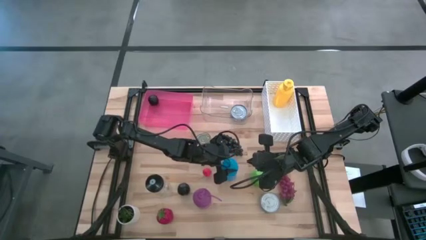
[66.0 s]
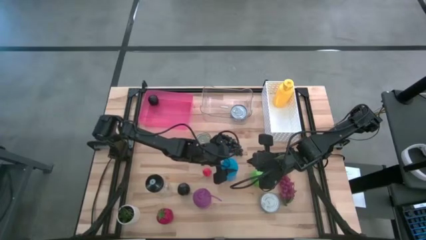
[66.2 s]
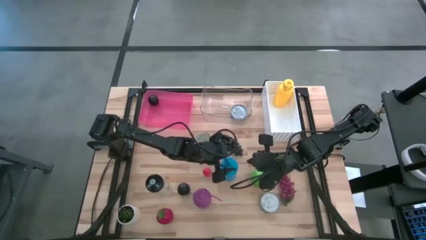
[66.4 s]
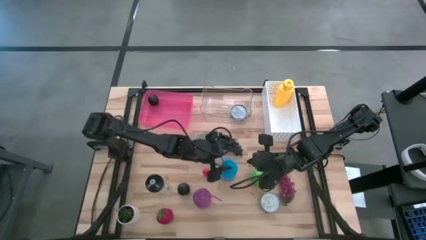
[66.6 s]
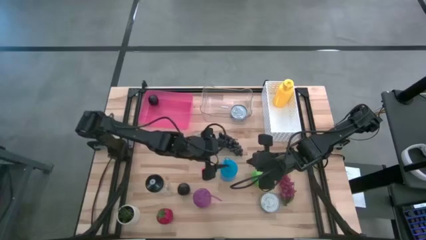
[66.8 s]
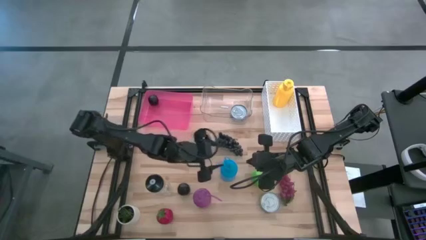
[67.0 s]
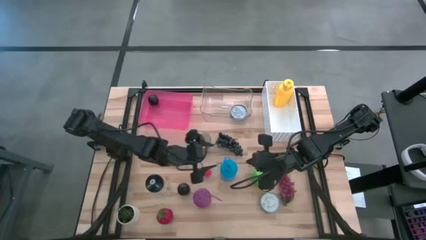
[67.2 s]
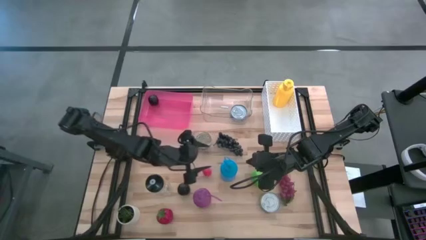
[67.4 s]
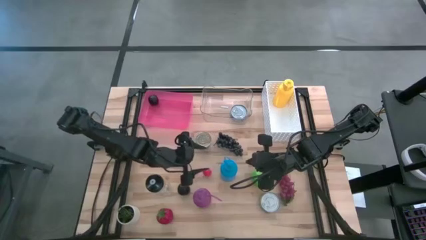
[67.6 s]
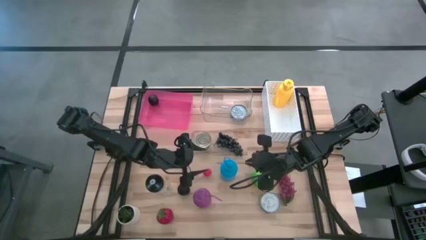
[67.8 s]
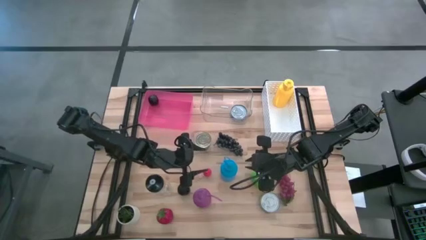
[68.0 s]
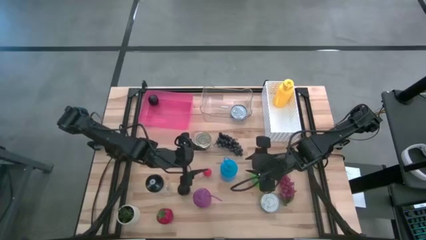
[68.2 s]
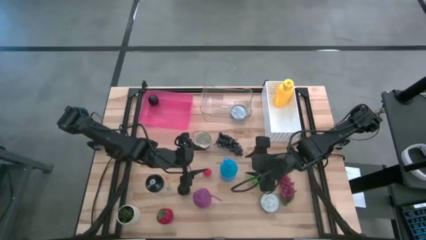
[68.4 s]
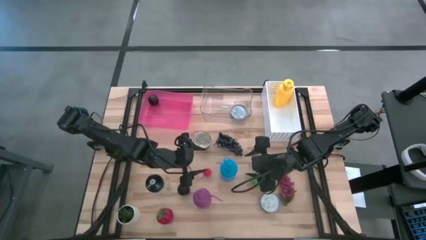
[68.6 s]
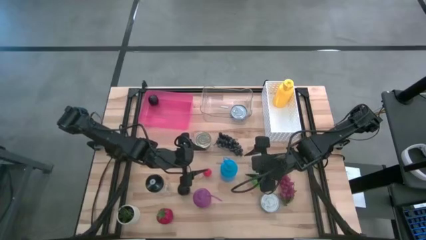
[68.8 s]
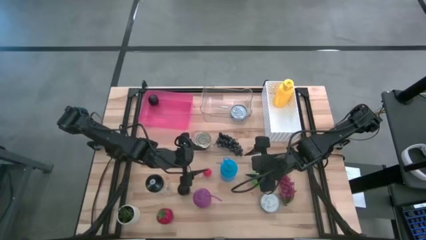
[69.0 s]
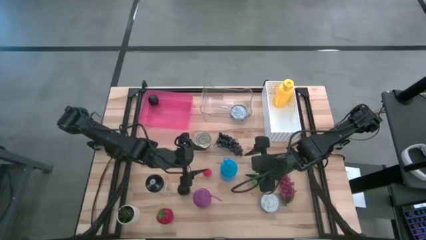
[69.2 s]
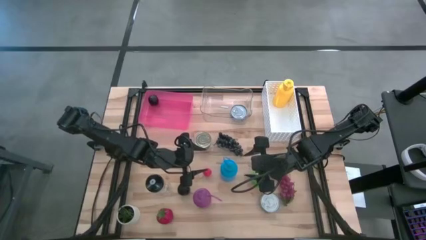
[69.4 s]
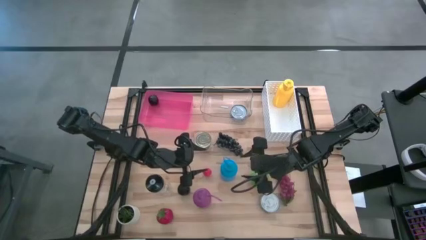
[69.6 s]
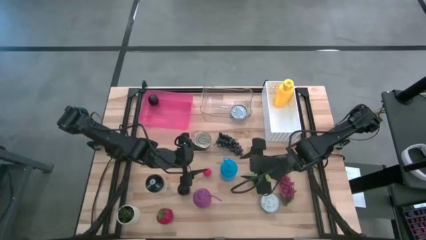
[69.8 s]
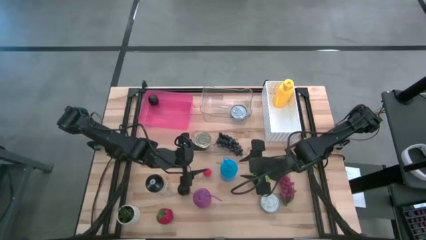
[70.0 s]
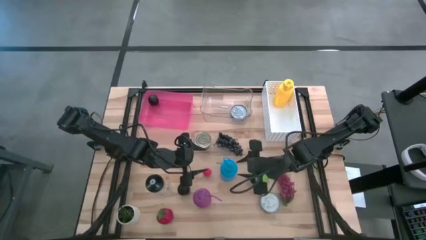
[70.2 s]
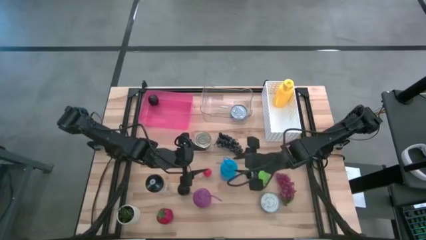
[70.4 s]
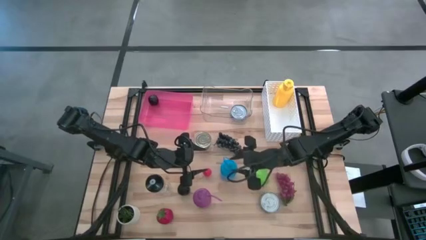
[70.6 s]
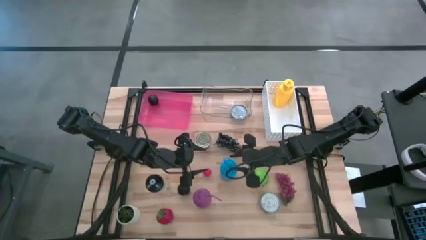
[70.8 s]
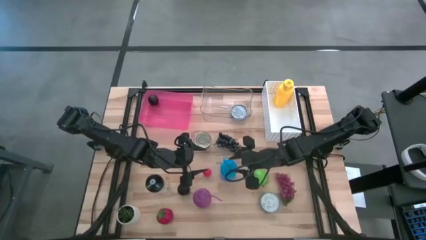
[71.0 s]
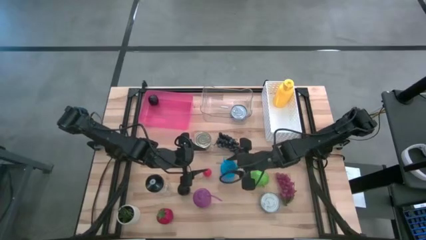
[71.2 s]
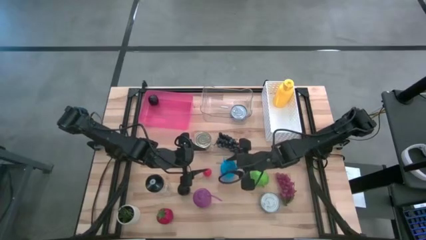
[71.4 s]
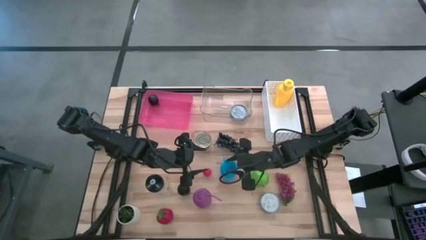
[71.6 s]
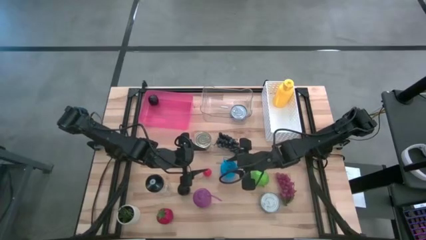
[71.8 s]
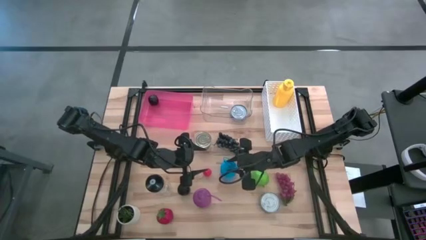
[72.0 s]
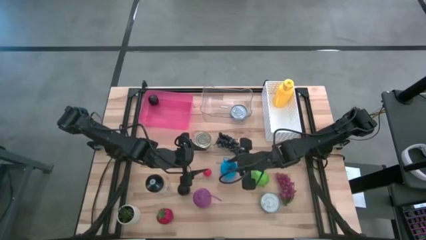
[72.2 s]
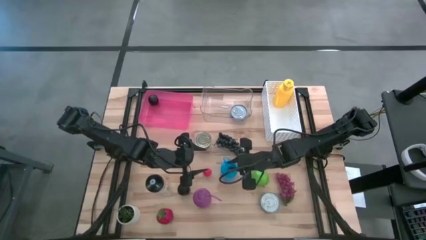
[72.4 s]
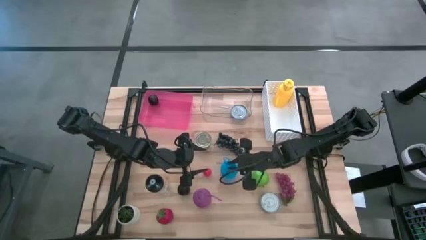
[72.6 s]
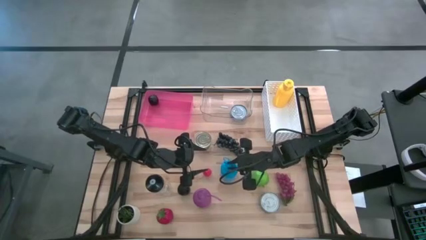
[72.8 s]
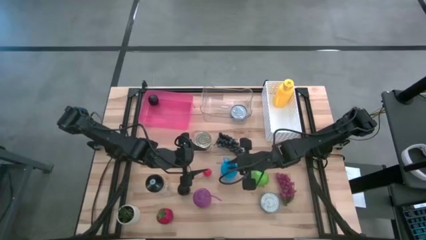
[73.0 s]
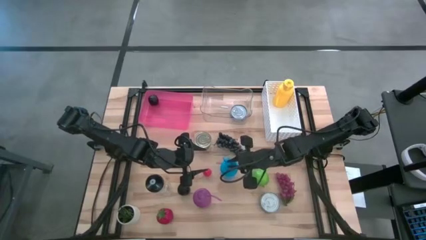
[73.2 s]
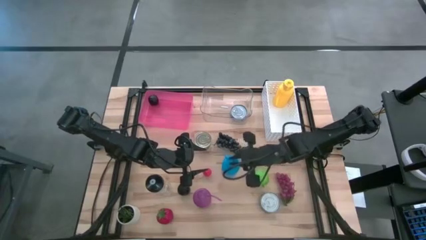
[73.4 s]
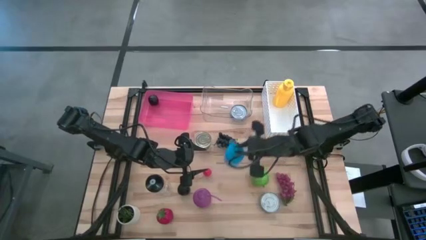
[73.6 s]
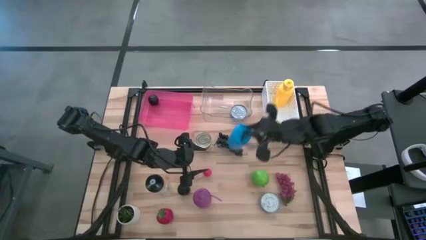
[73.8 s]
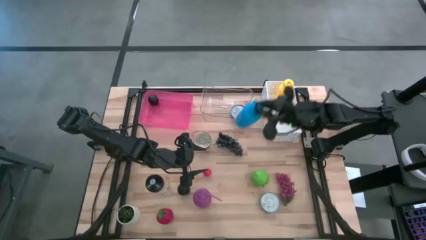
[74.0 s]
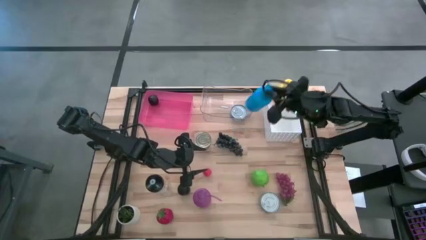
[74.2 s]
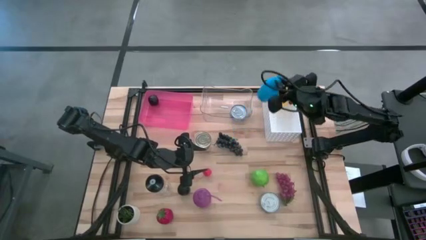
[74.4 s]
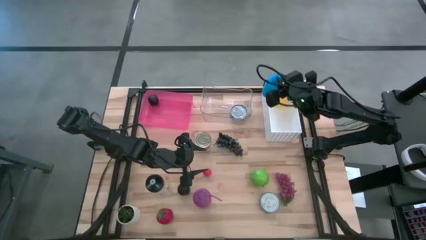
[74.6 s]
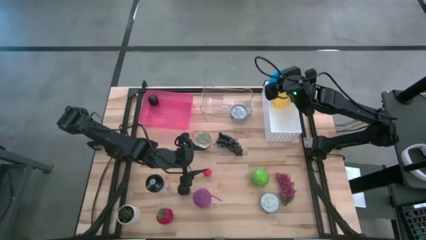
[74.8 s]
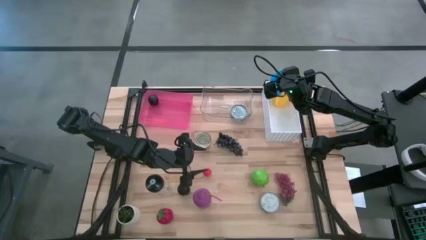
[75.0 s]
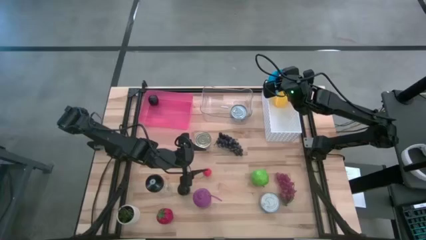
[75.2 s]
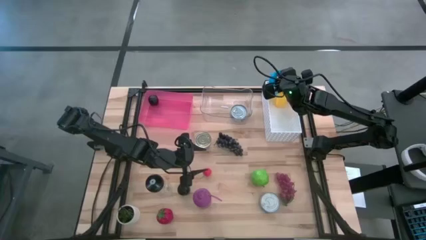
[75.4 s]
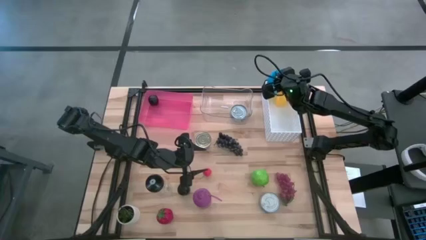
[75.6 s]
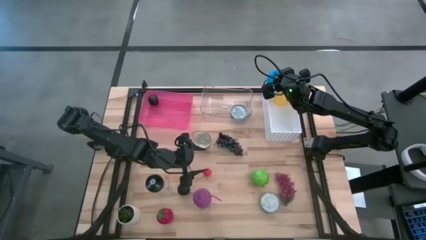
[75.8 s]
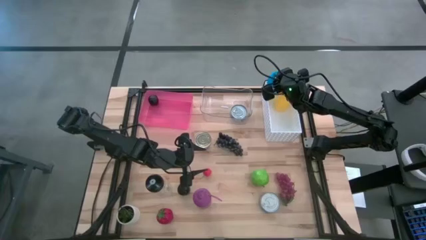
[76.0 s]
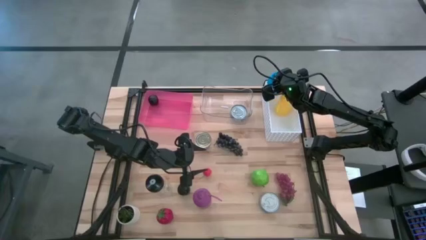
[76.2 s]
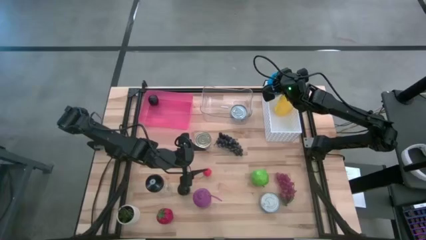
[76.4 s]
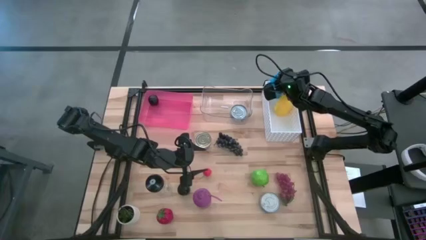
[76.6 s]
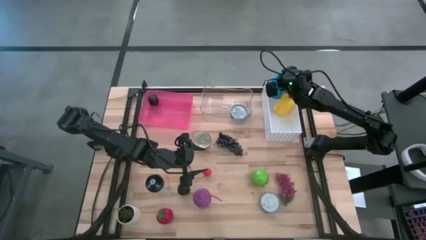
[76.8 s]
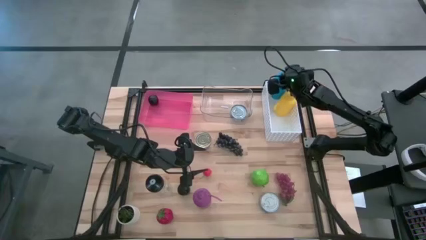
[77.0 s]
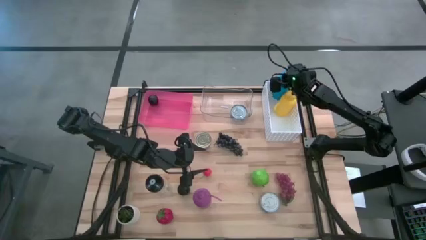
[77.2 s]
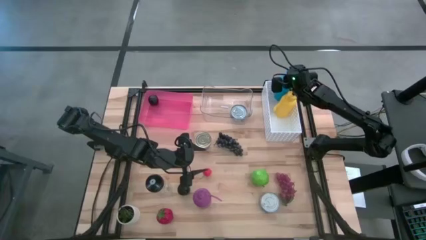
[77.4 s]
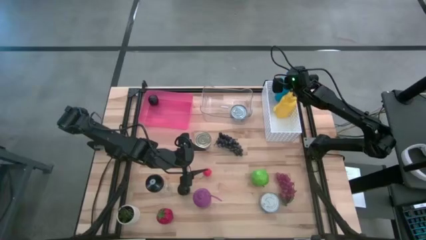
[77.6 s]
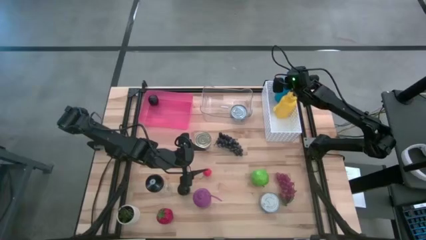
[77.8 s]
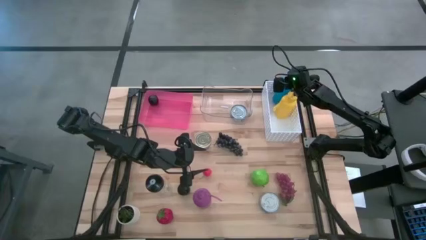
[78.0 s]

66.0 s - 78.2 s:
Task: Pick & Place Food Item
Put the blue water bottle into the white bin

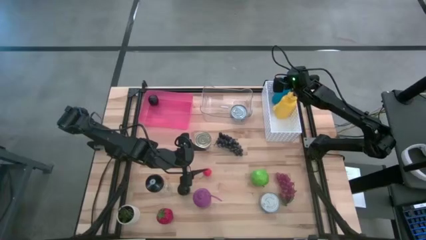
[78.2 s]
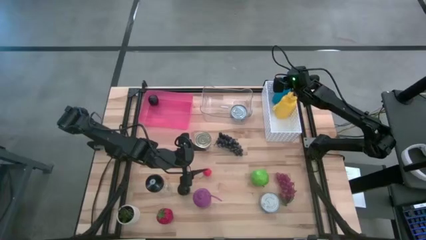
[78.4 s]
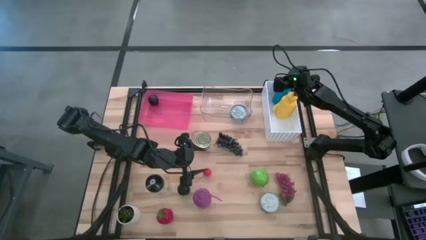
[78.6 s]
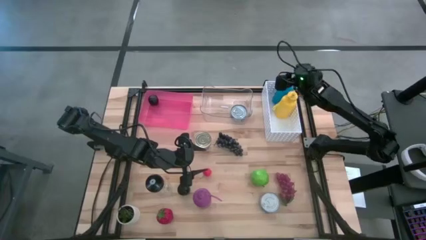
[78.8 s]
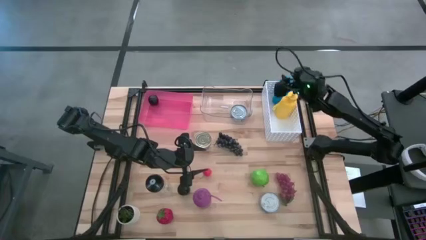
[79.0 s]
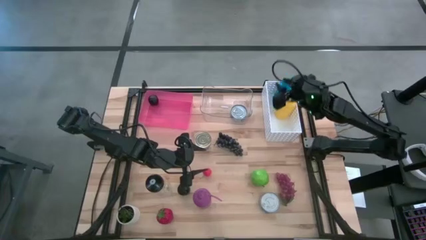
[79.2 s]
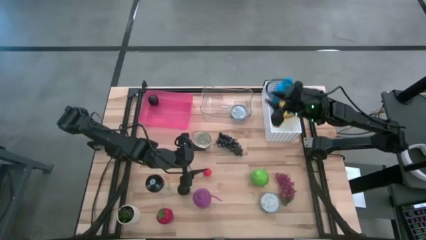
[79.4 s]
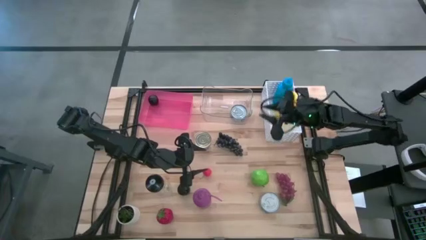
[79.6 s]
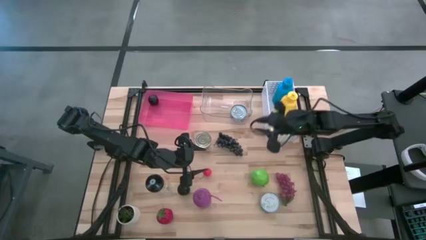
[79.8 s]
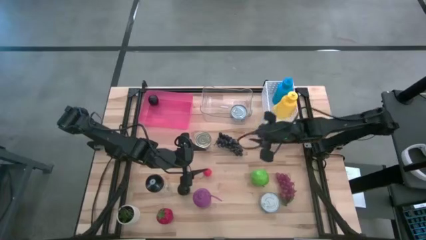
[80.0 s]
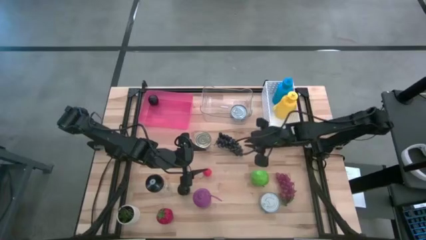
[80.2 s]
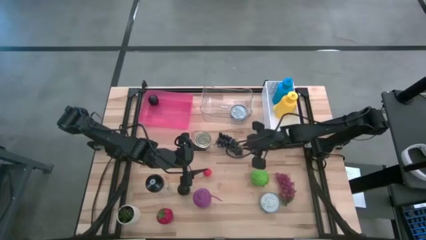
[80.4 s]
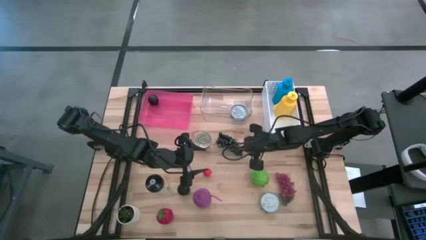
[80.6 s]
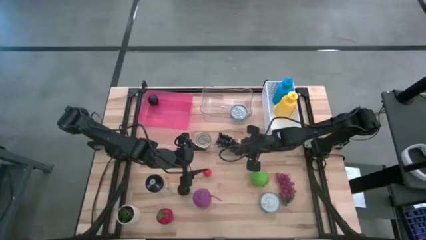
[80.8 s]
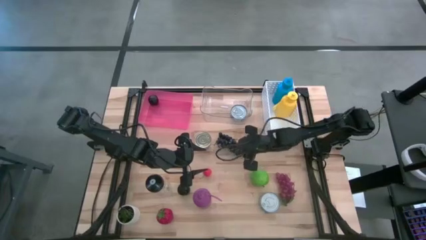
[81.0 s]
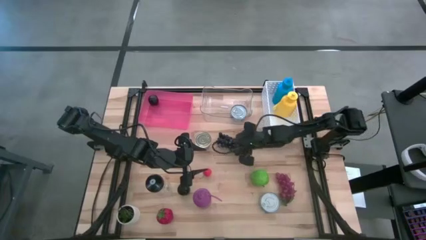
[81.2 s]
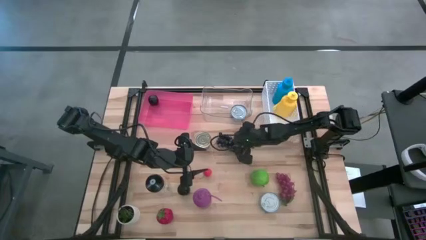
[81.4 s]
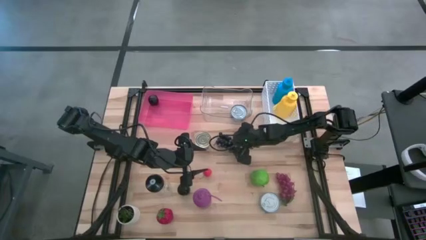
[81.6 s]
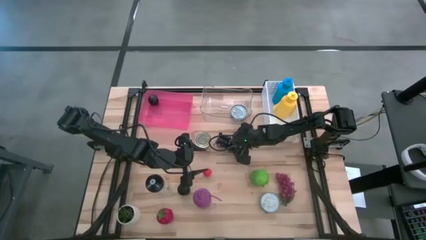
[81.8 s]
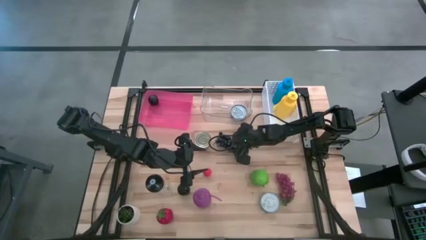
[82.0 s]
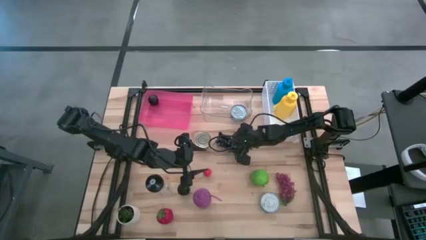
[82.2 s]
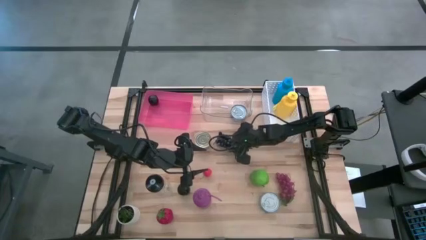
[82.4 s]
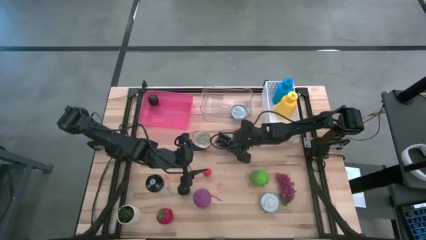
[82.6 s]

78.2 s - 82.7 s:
Put the black grapes into the pink bin
